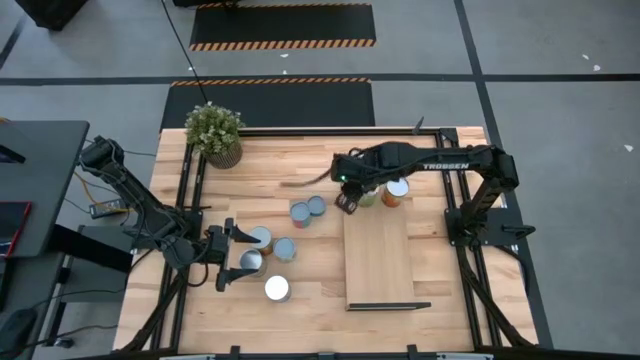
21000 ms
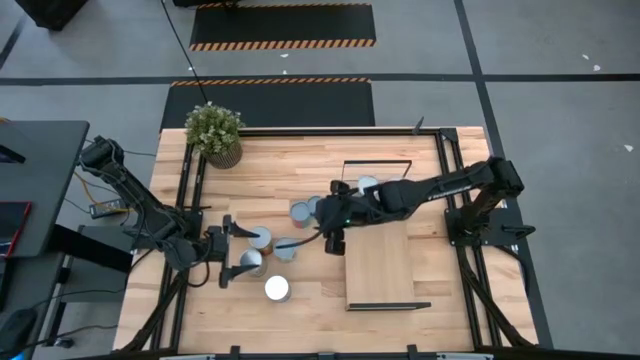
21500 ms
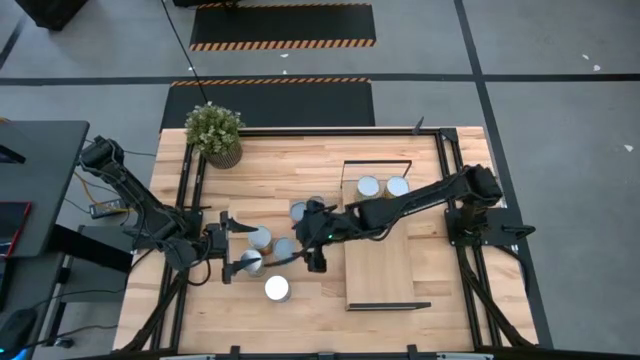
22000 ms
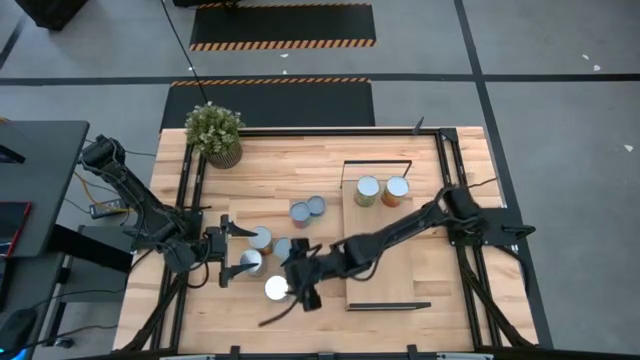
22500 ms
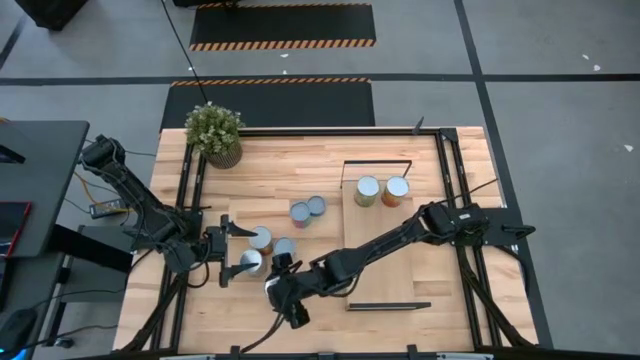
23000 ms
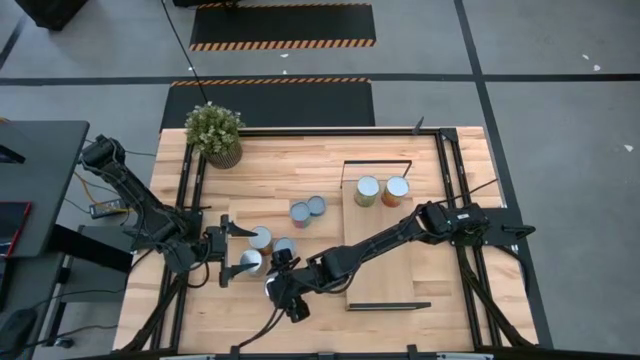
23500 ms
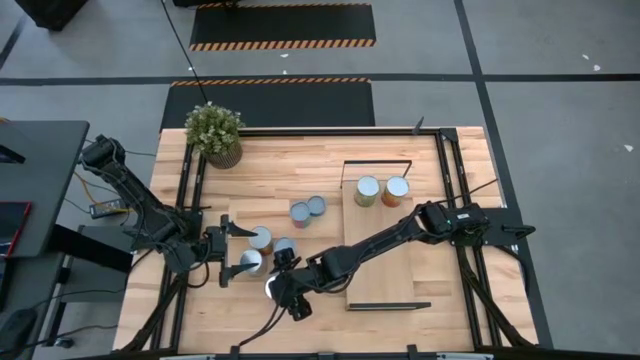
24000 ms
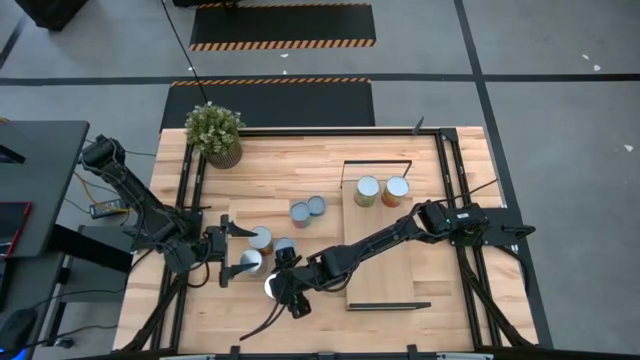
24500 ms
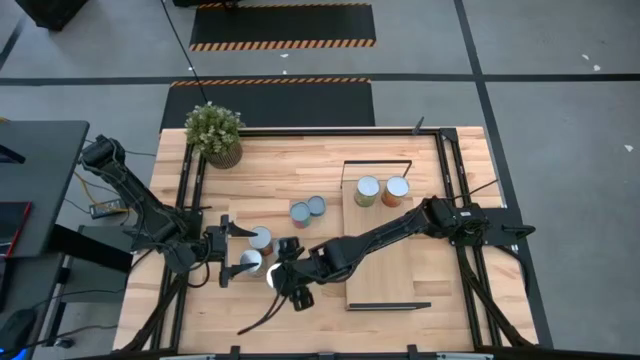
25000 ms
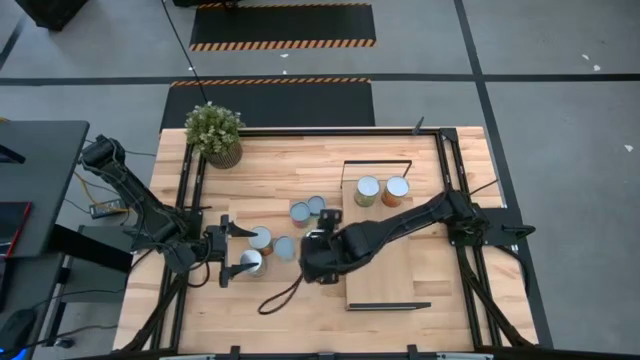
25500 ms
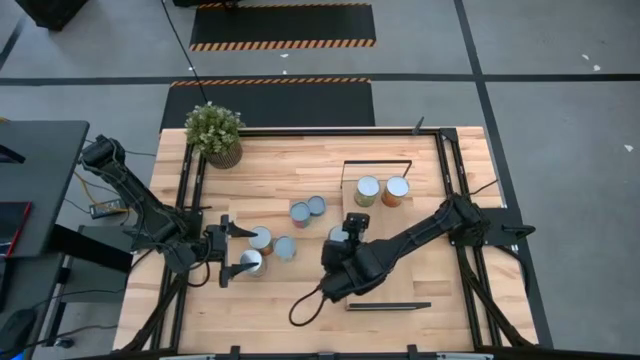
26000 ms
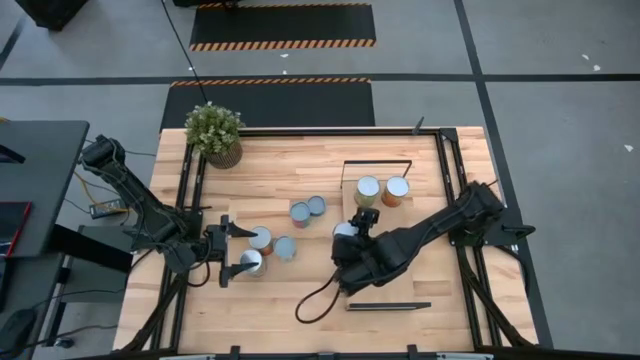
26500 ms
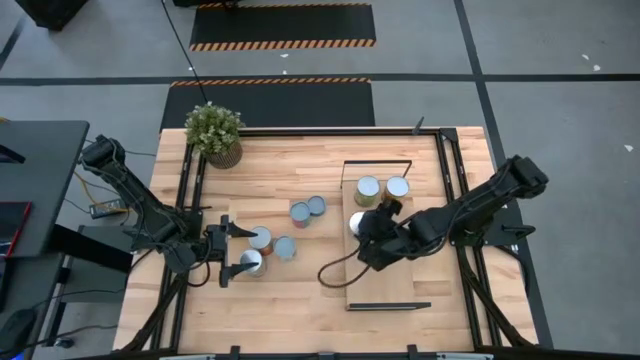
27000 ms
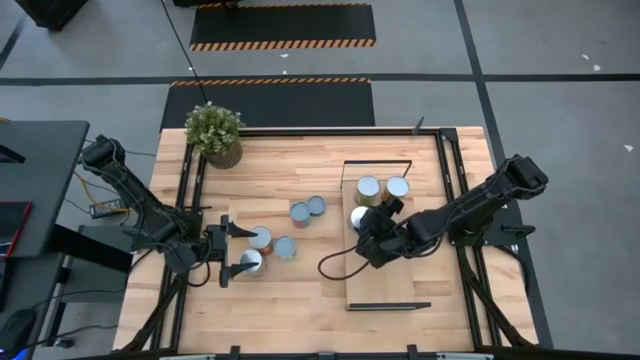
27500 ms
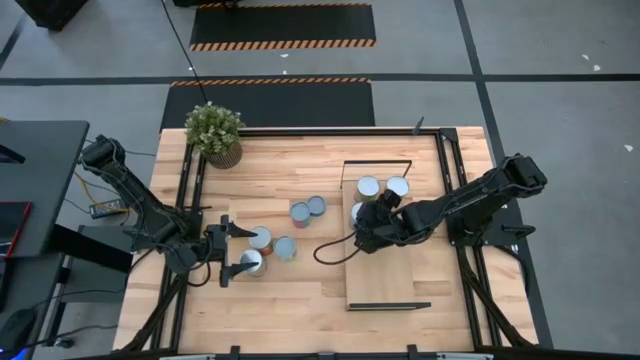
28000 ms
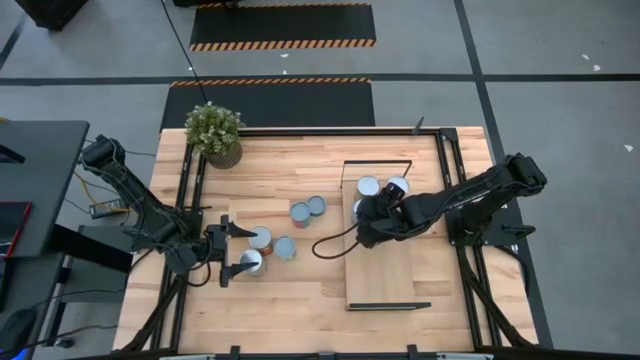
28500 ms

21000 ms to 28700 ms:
Task: Pick and place cans onto a shelf
Put the canned cherries on the shelf

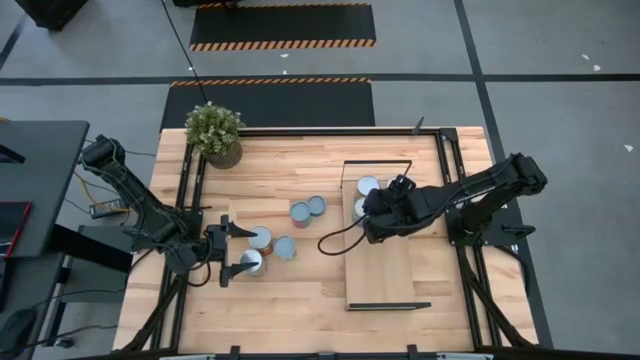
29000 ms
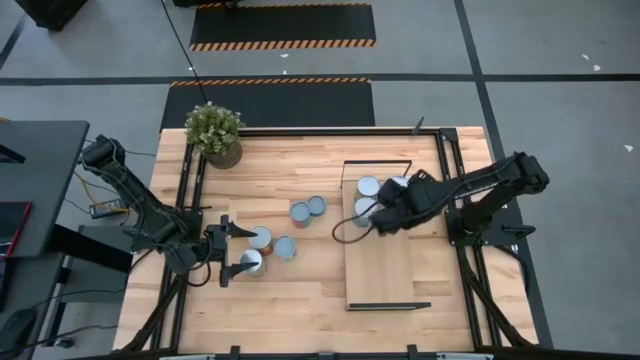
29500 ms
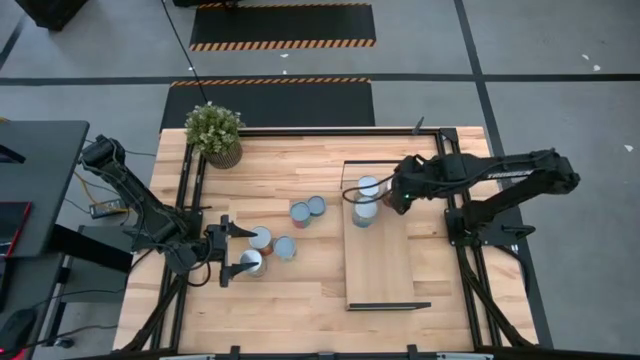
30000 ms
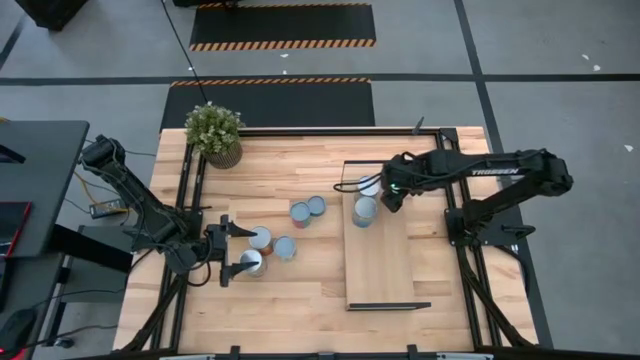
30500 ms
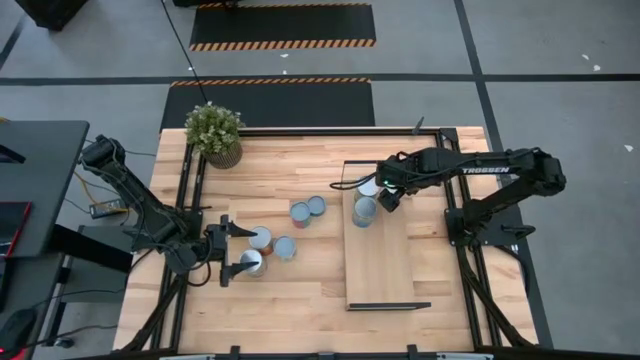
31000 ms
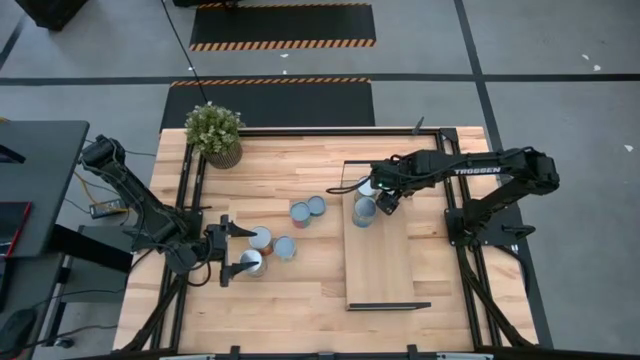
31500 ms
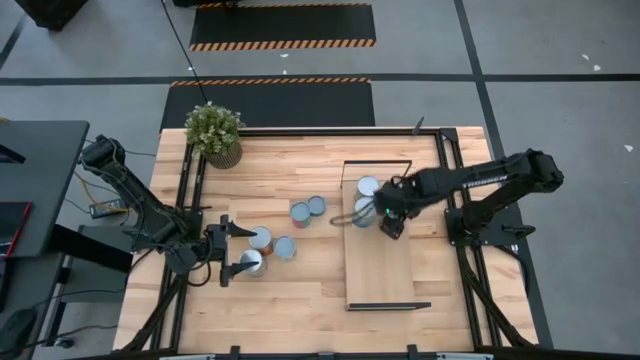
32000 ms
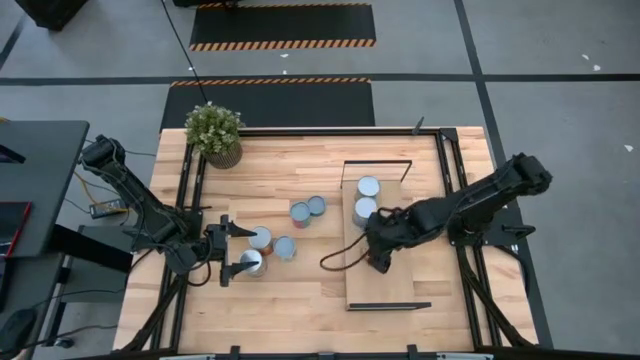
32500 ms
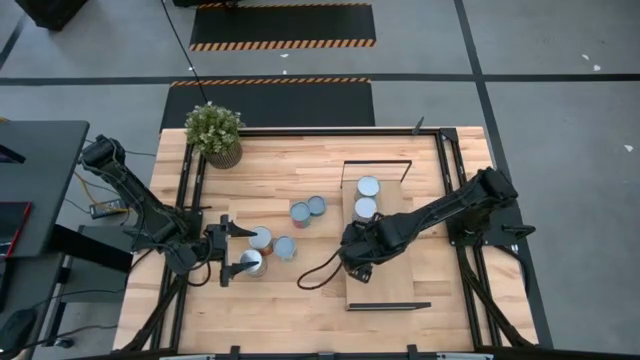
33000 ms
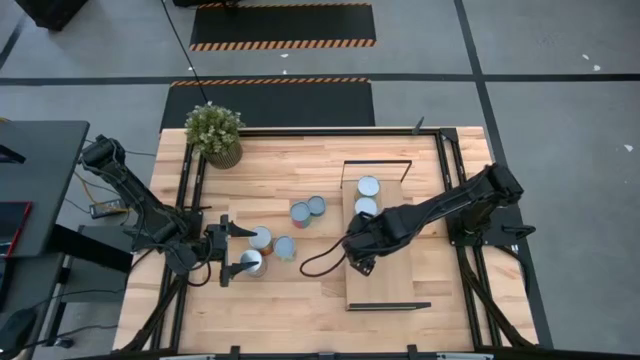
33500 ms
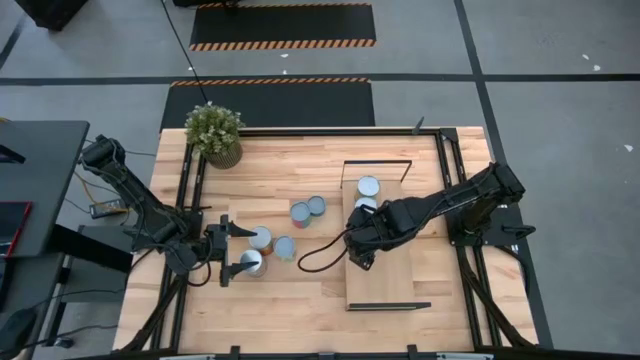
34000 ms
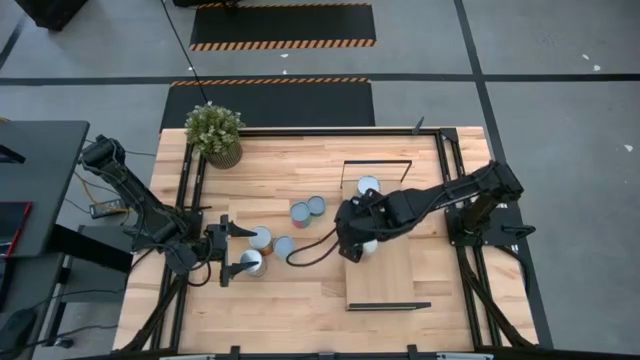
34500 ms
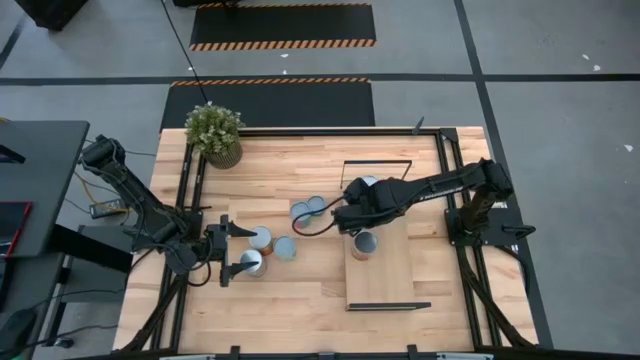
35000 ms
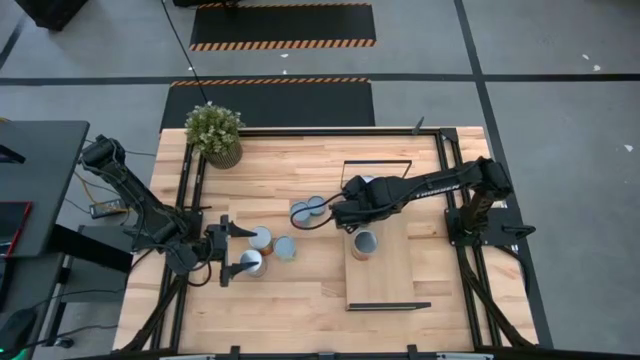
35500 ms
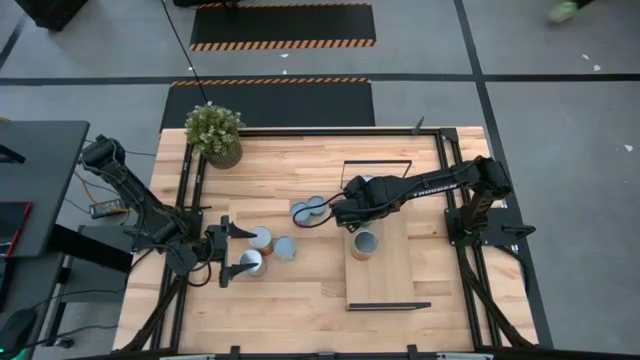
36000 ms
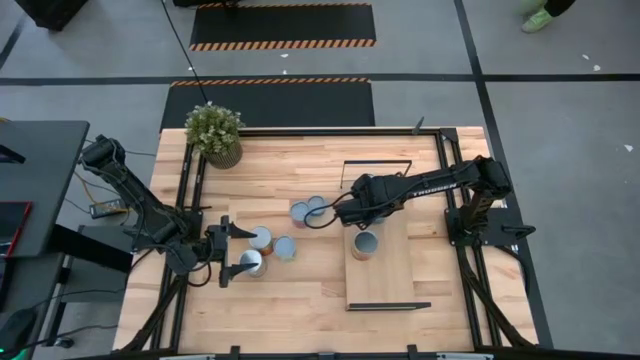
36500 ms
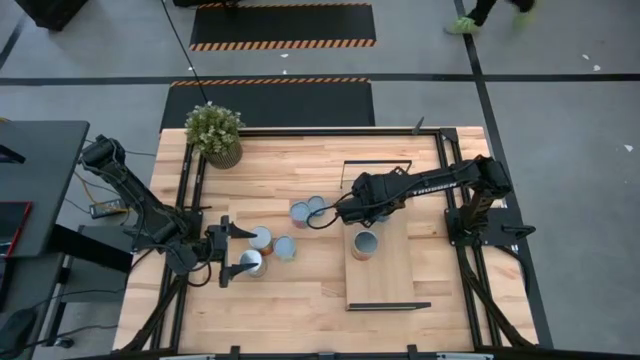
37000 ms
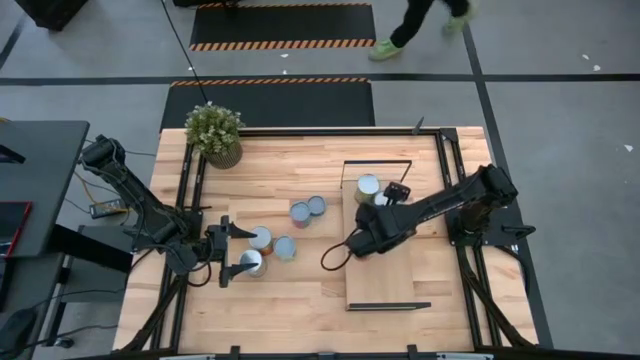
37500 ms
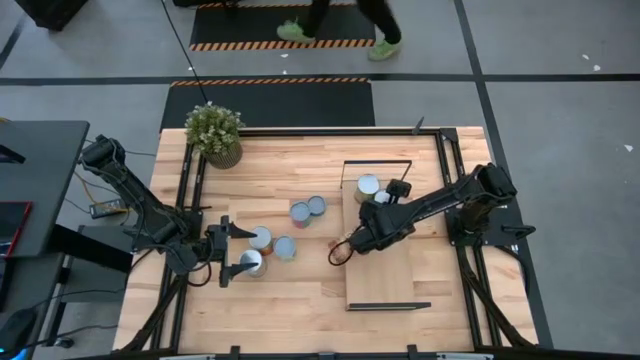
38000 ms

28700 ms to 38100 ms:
Adjust the cans on the shelf

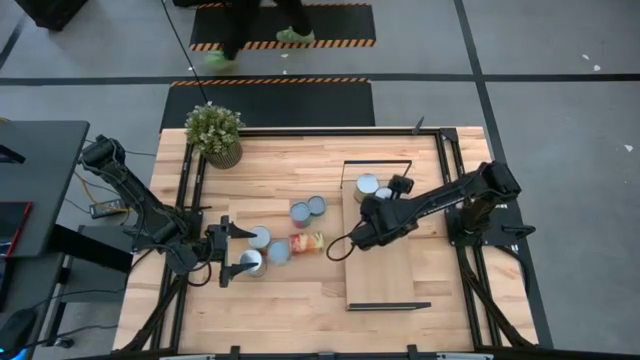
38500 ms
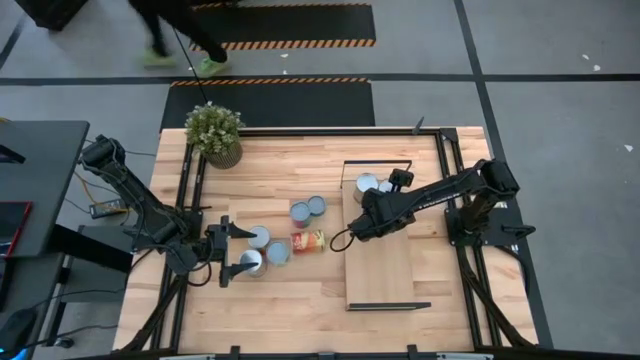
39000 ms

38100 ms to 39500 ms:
Adjust the cans on the shelf

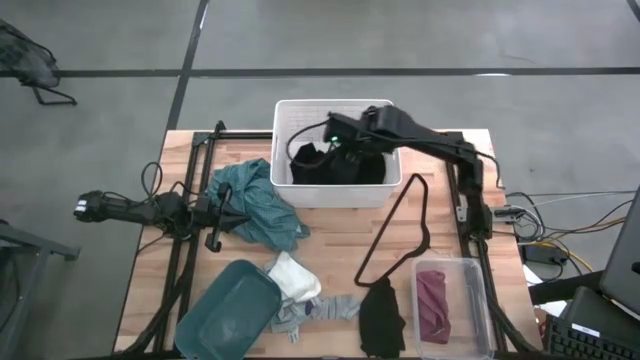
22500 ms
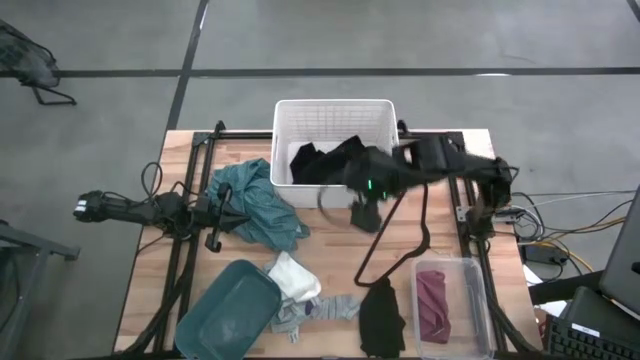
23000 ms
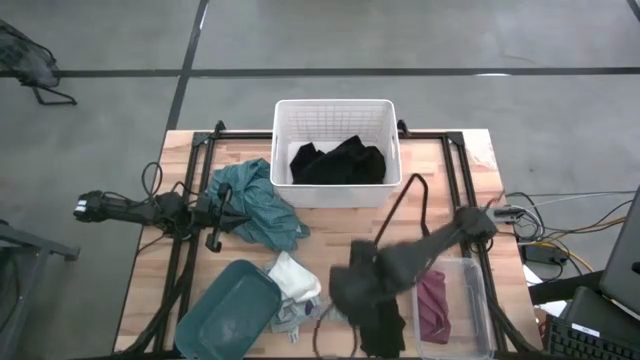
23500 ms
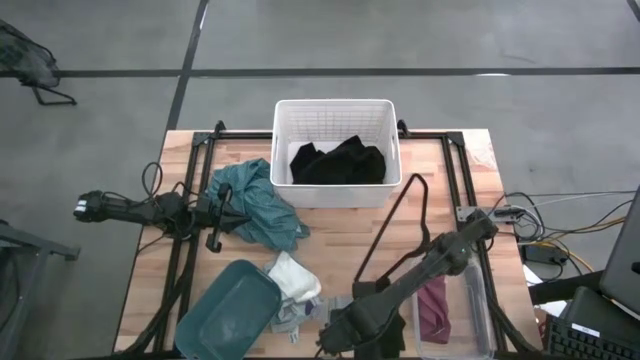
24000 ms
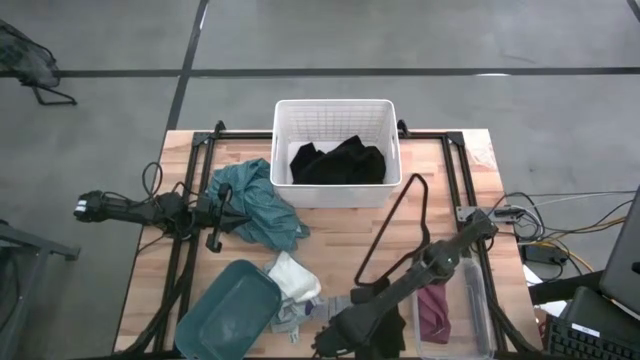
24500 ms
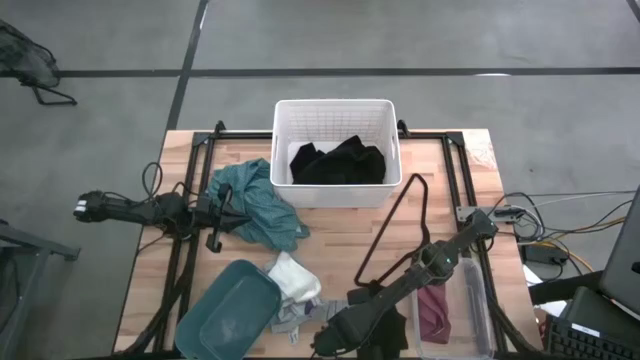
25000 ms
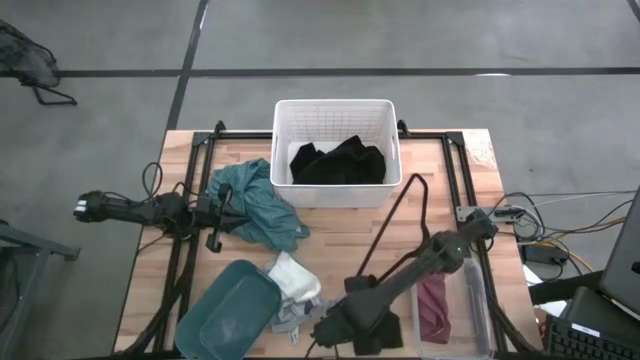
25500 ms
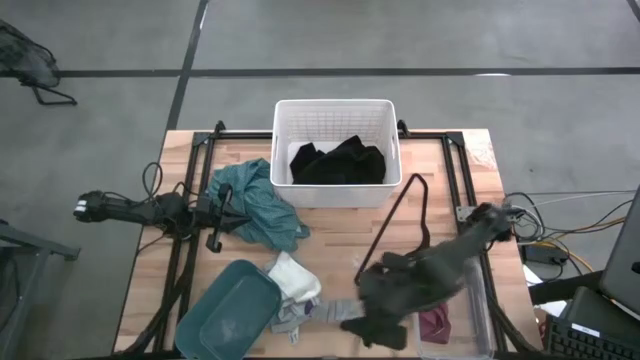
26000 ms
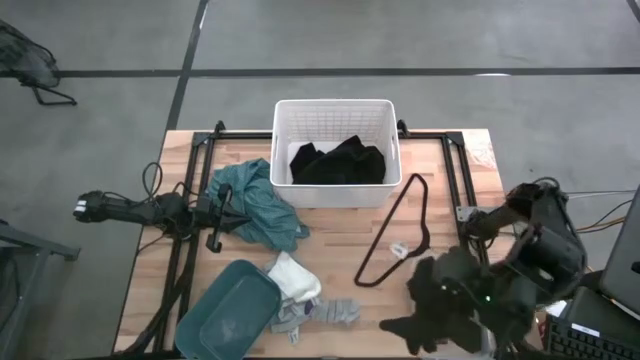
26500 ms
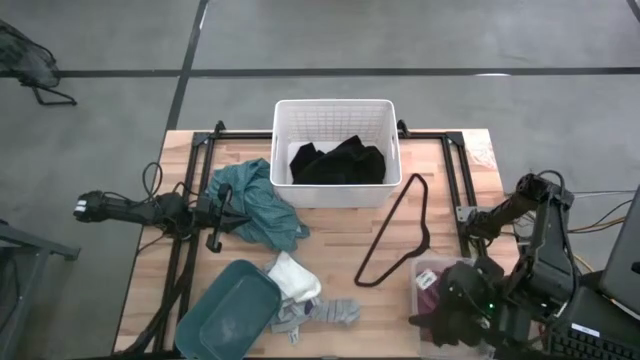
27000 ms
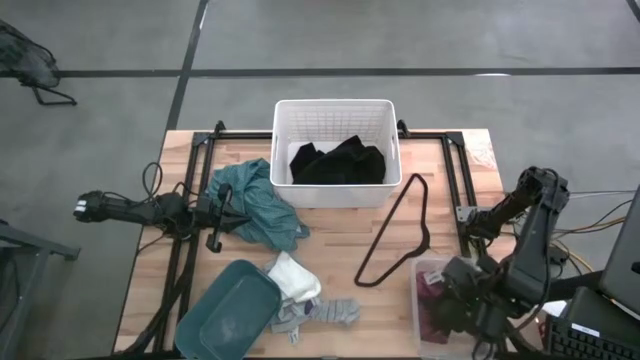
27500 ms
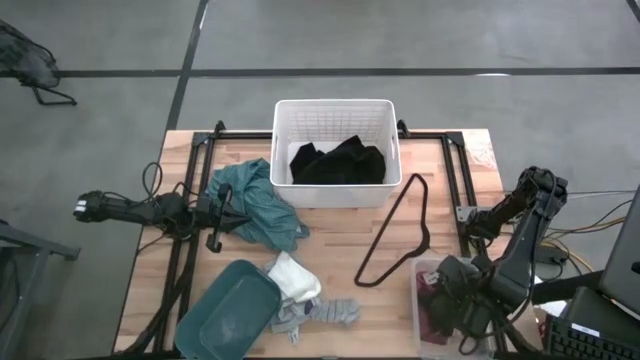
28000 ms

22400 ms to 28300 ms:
Task: Pick & Place Cloths
Put the black underwear into the transparent bin
